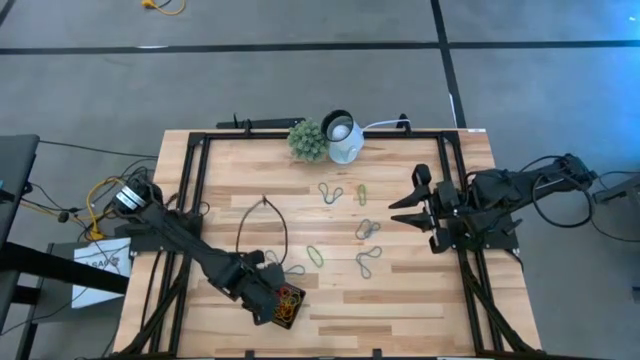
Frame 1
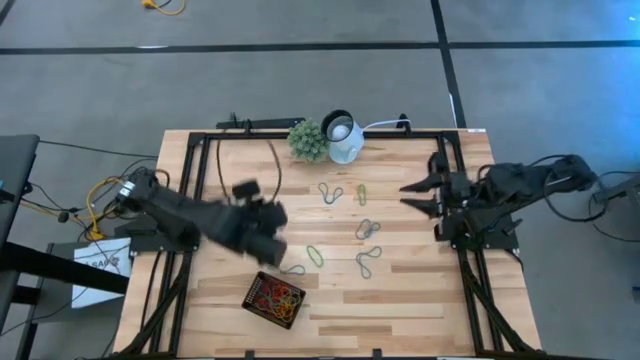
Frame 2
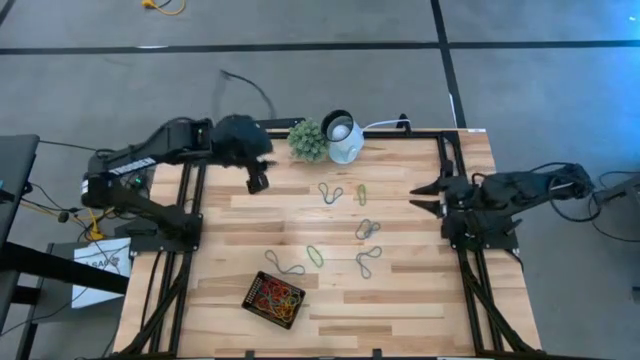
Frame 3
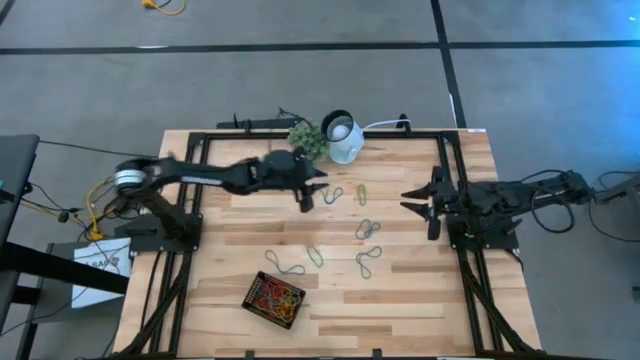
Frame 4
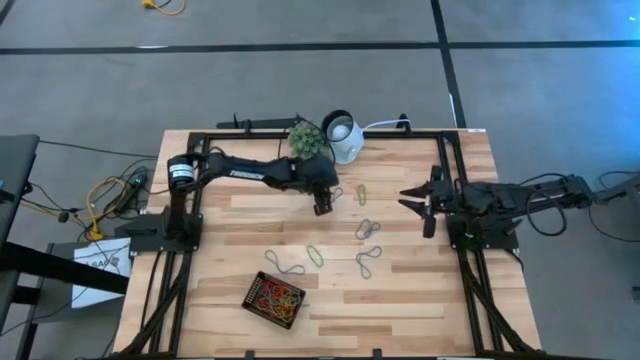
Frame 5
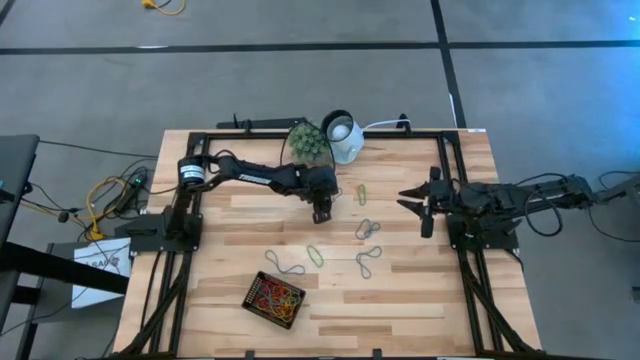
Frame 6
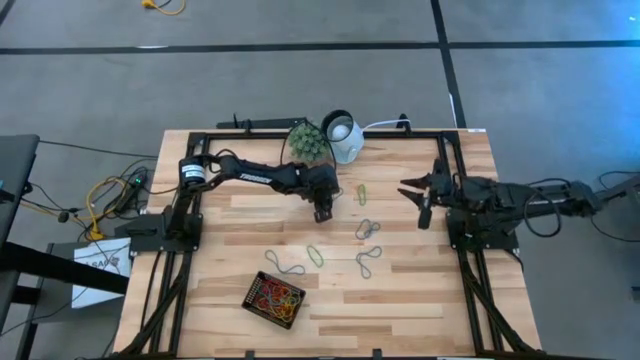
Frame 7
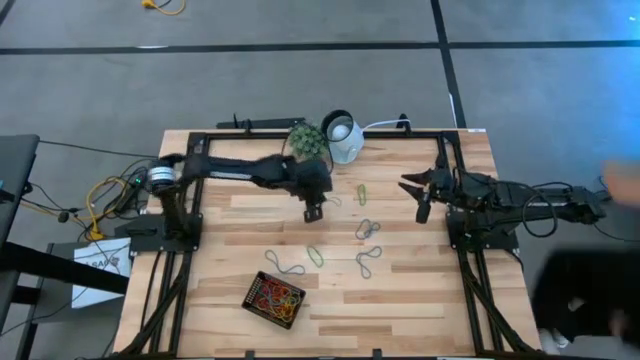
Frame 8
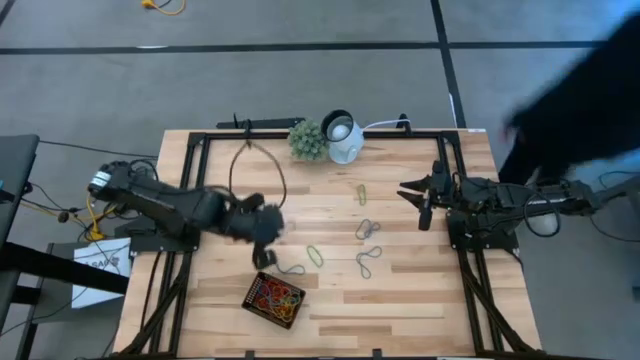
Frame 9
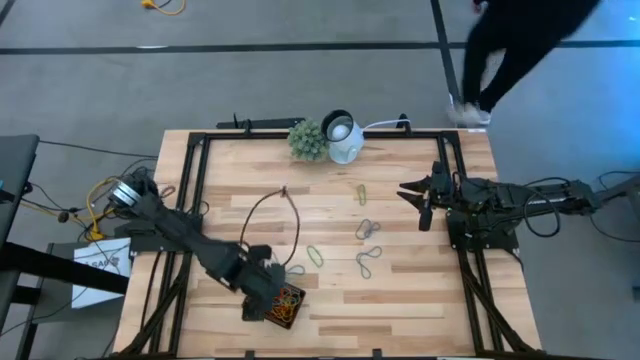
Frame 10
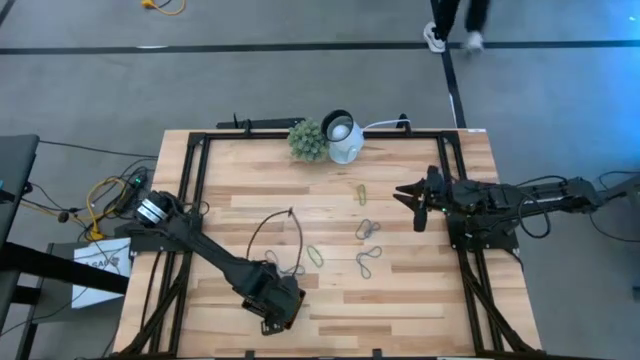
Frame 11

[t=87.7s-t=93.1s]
Task: Pick and place items into bin
Put the blue rubber band into the black bin

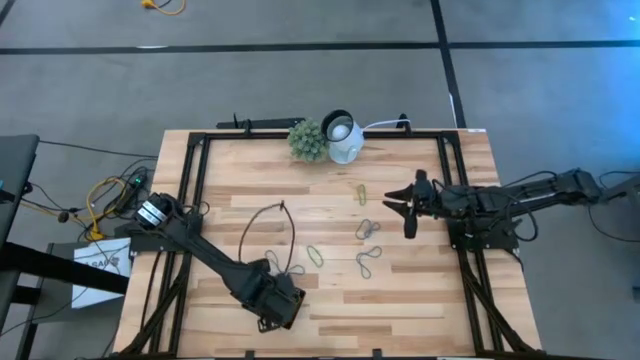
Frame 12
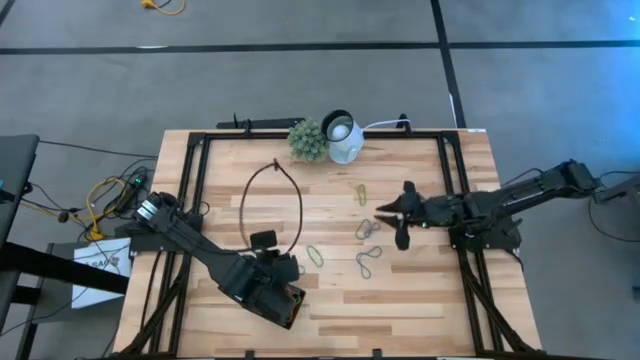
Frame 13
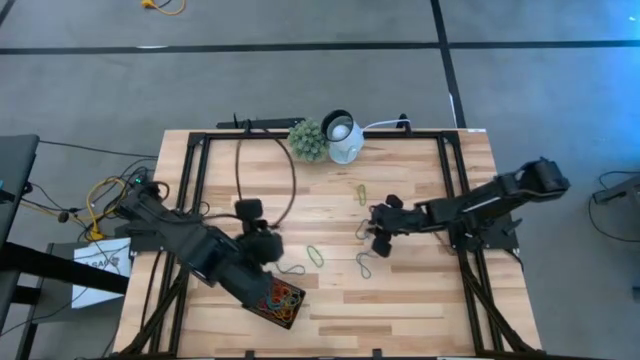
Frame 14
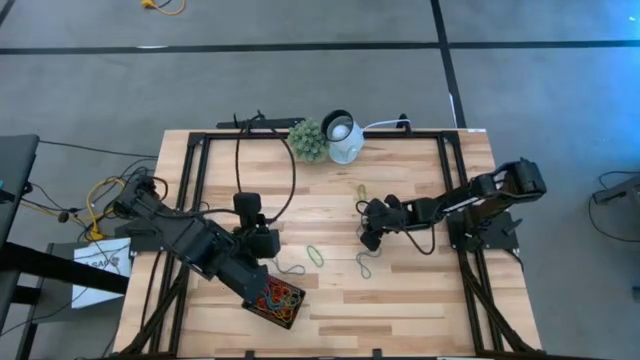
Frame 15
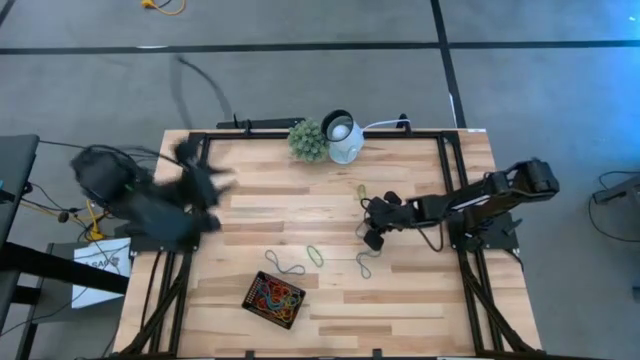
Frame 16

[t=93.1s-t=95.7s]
Put the blue rubber band into the black bin

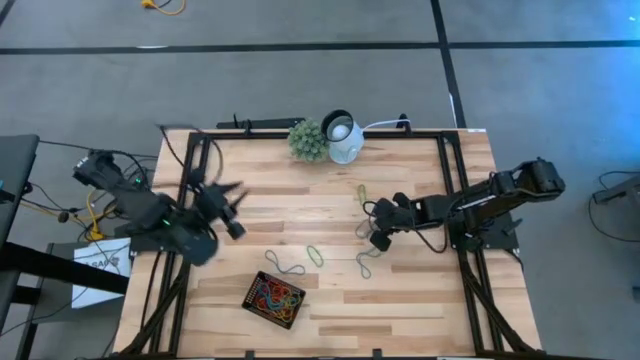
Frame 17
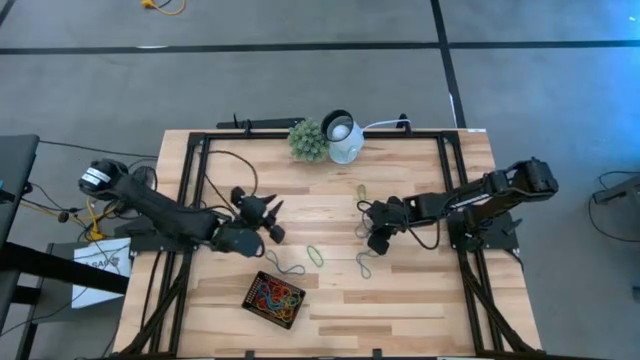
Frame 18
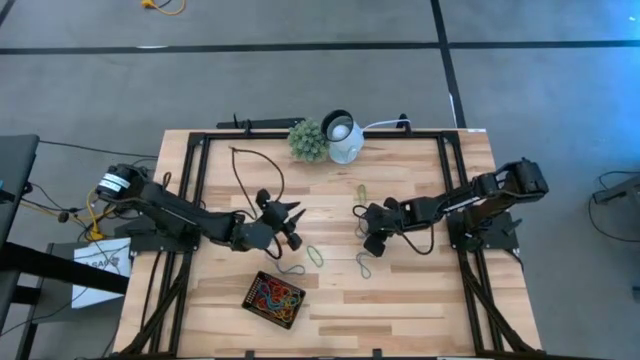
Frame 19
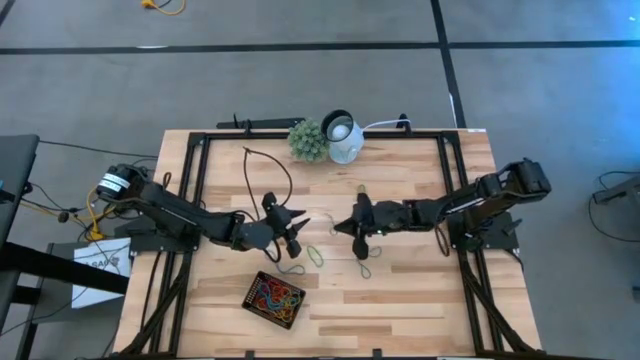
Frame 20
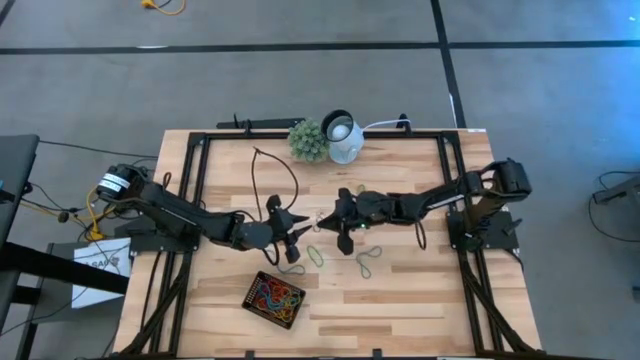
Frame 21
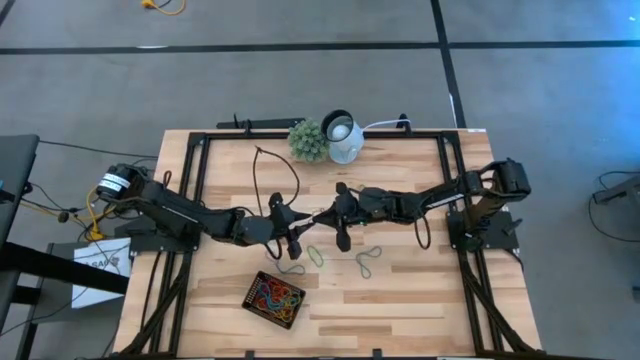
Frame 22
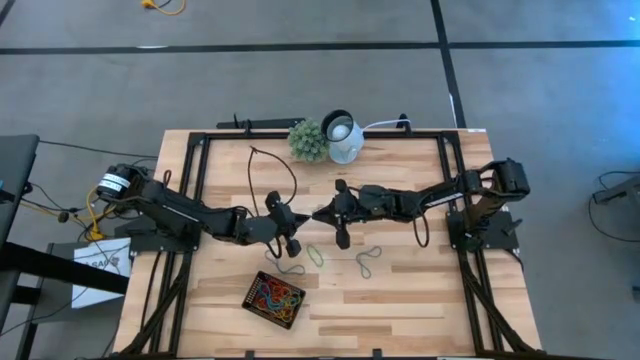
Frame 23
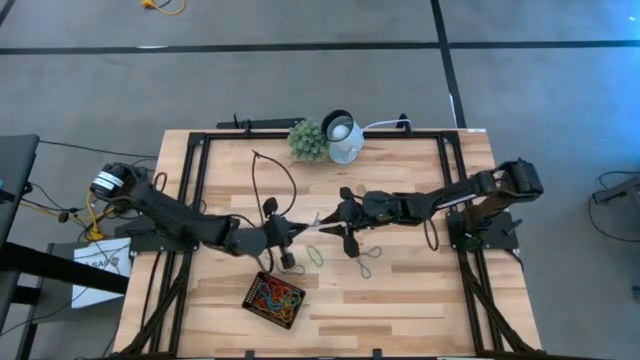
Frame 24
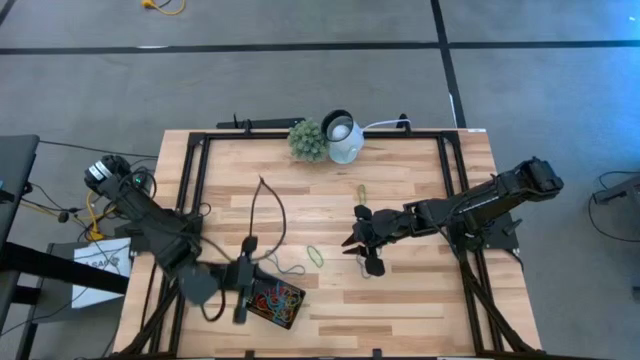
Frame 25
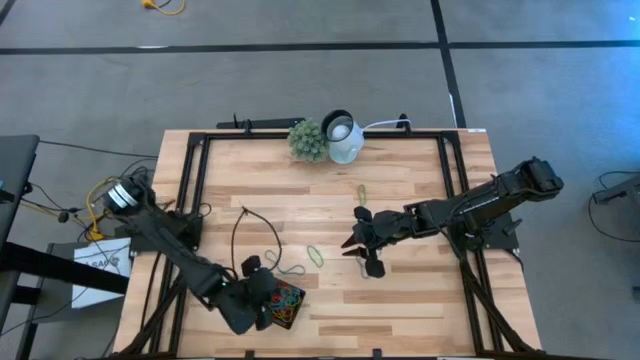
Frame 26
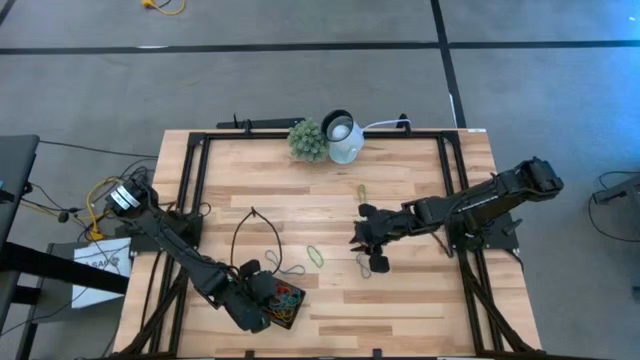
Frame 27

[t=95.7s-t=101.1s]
Put the blue rubber band into the black bin

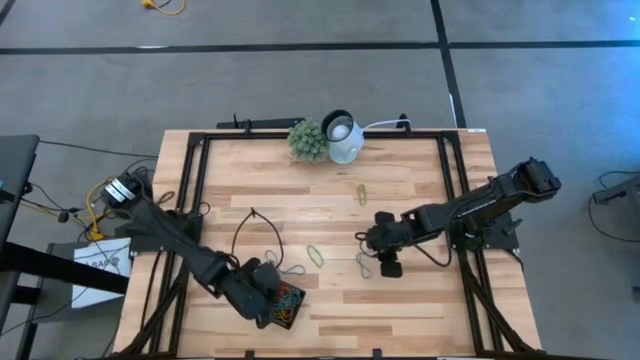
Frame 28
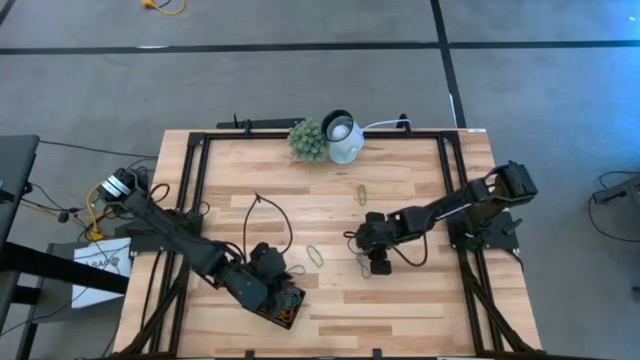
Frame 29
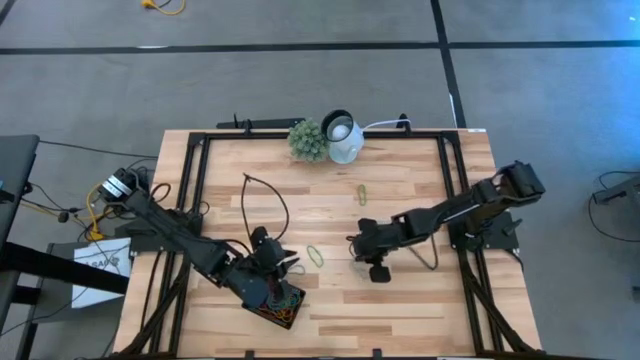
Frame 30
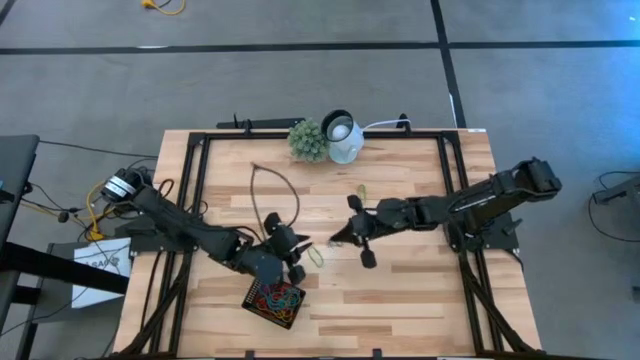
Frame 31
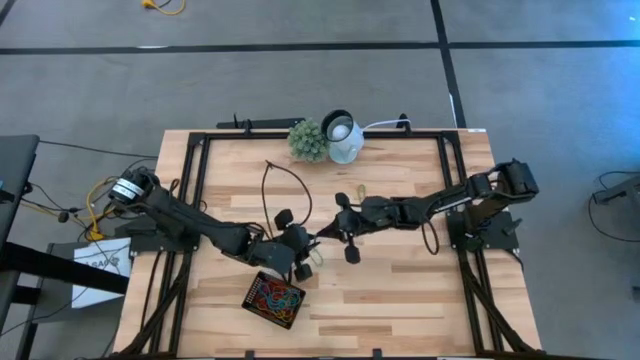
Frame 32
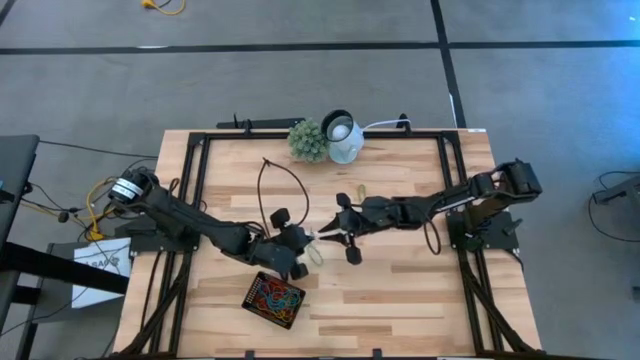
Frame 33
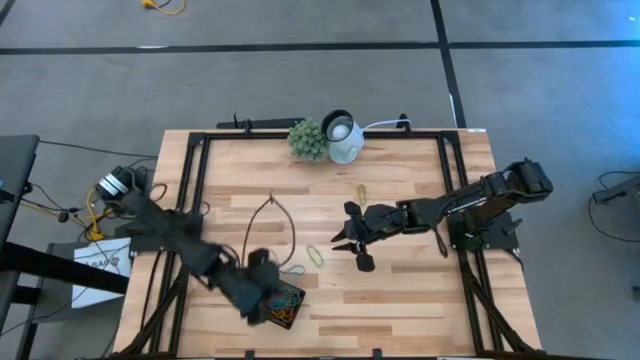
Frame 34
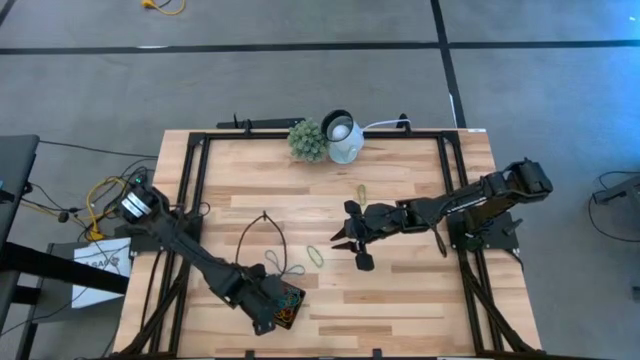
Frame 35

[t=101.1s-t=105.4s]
Put the blue rubber band into the black bin

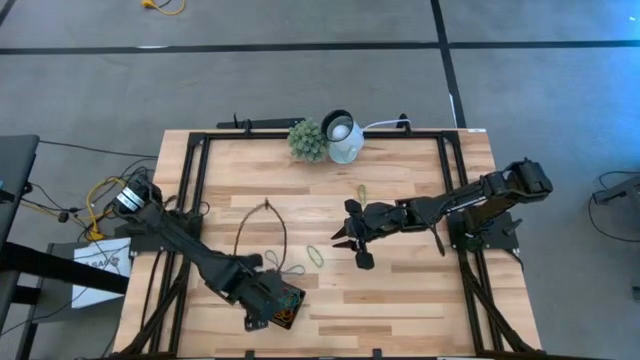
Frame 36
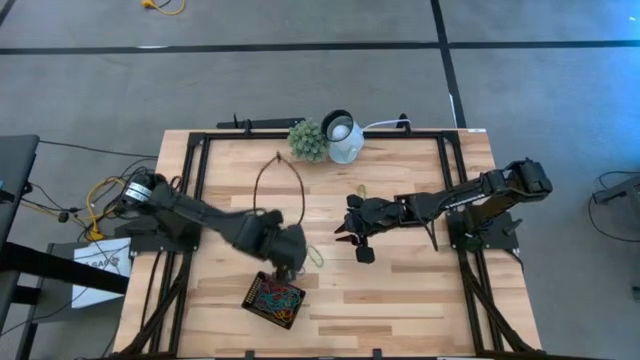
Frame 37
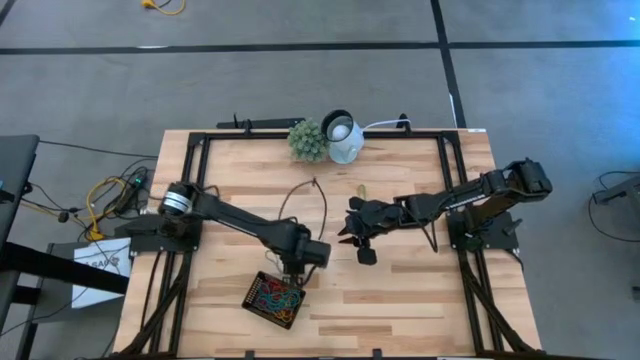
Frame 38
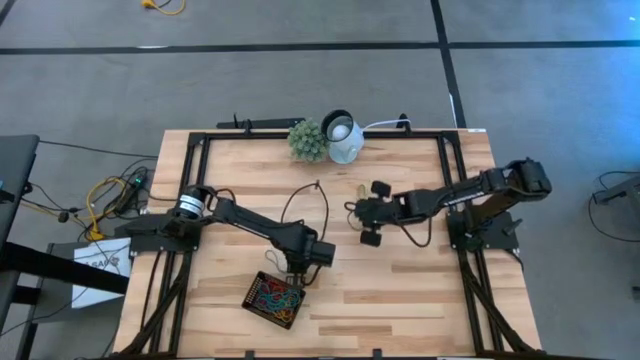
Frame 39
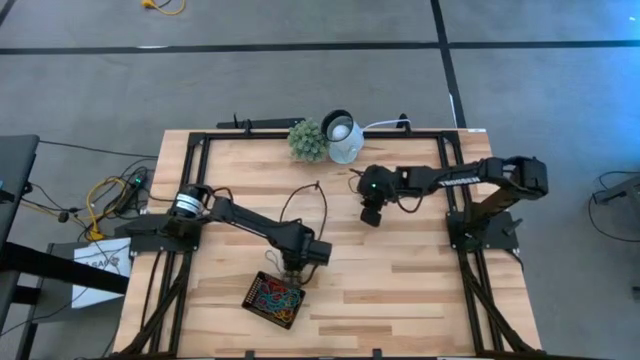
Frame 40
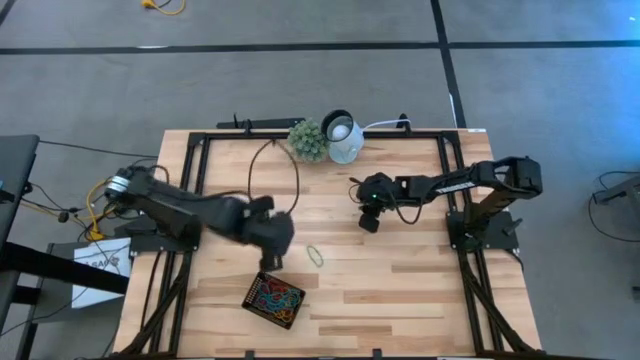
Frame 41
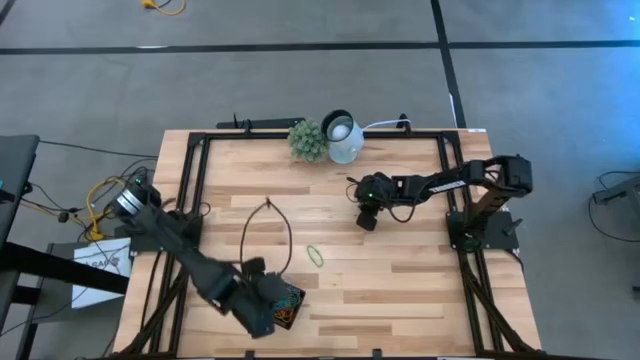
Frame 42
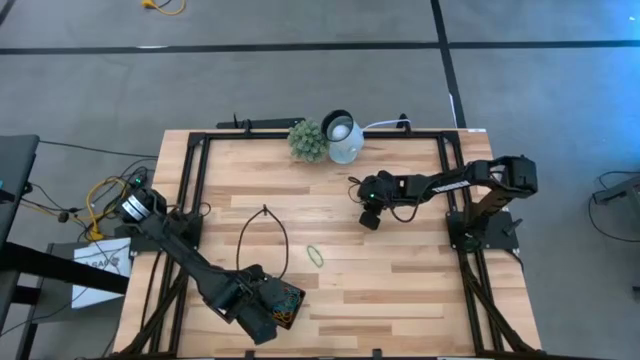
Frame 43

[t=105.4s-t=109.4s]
Put the blue rubber band into the black bin
